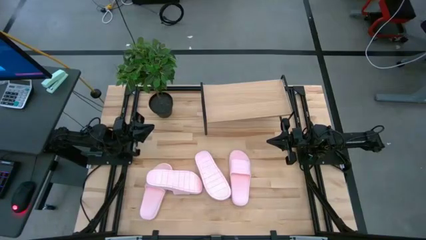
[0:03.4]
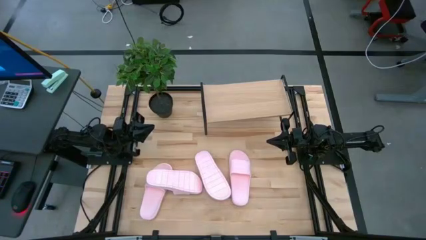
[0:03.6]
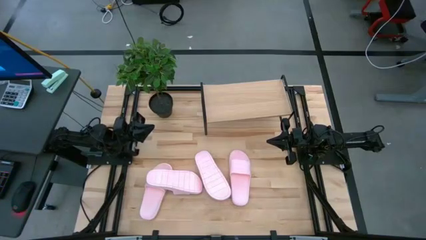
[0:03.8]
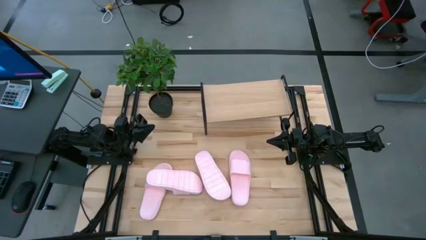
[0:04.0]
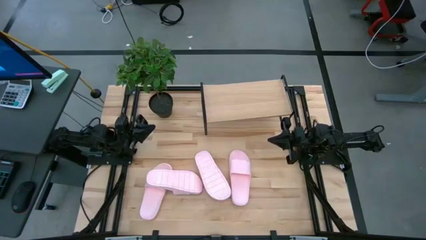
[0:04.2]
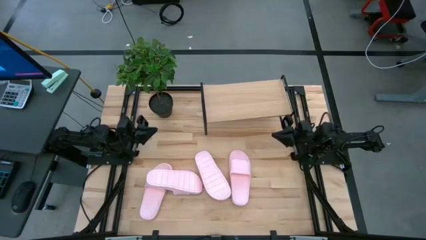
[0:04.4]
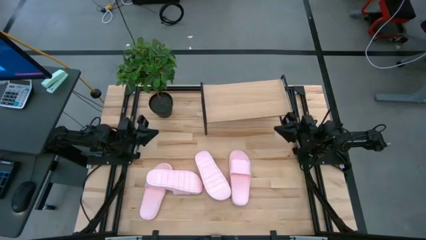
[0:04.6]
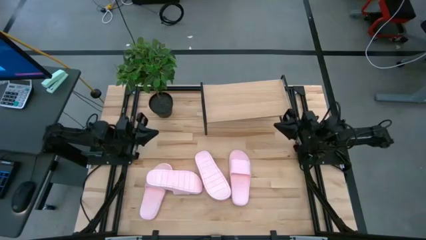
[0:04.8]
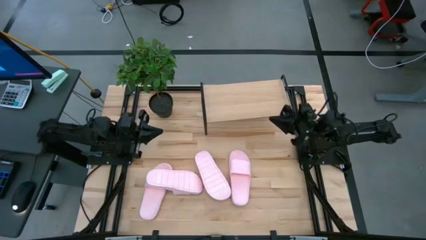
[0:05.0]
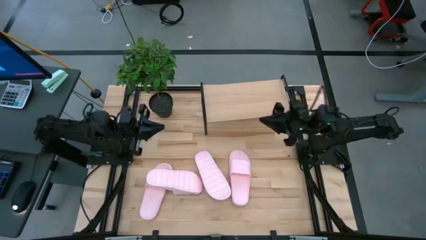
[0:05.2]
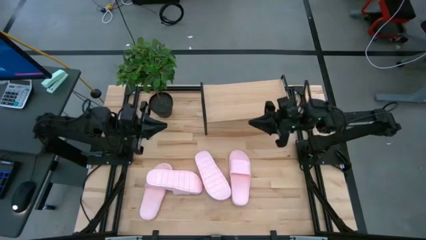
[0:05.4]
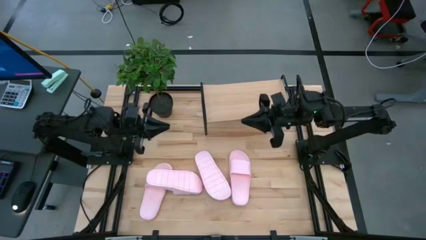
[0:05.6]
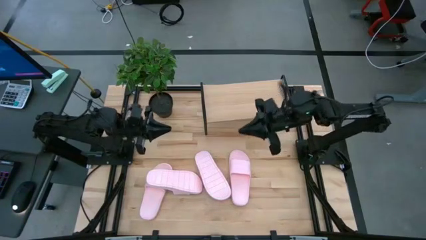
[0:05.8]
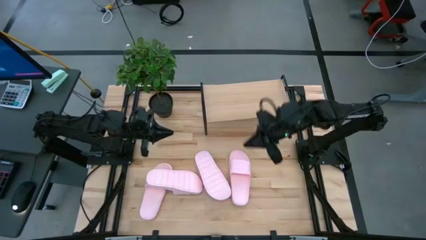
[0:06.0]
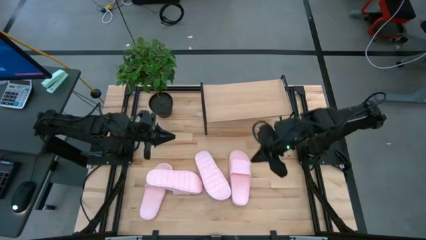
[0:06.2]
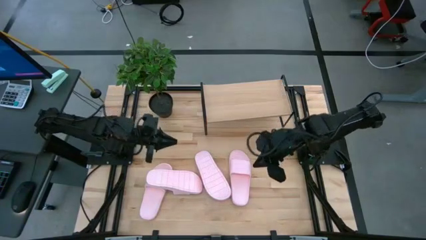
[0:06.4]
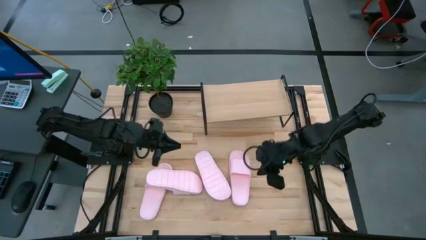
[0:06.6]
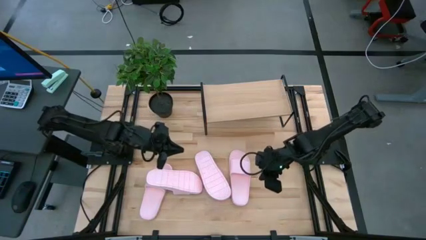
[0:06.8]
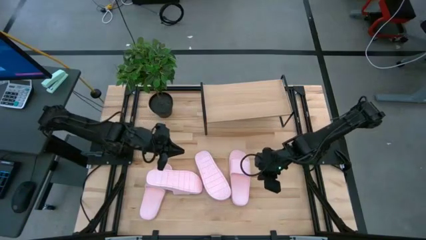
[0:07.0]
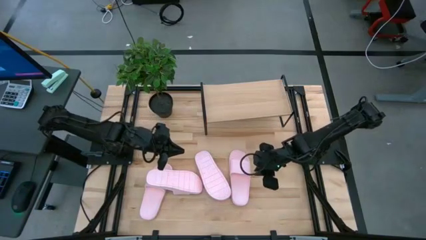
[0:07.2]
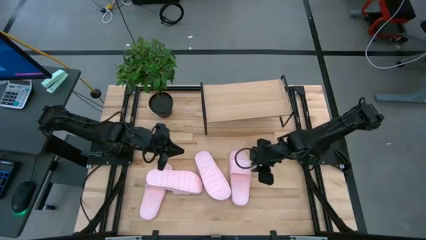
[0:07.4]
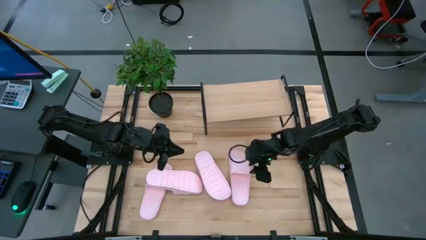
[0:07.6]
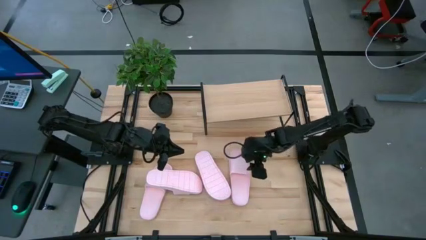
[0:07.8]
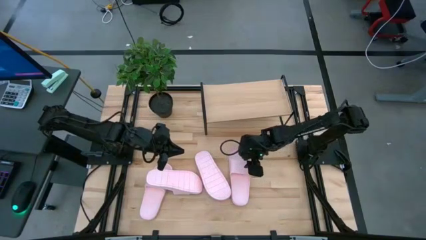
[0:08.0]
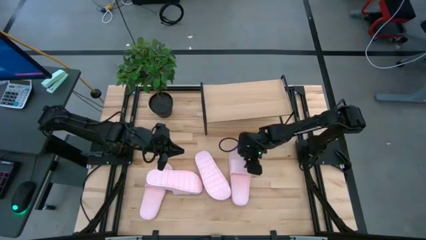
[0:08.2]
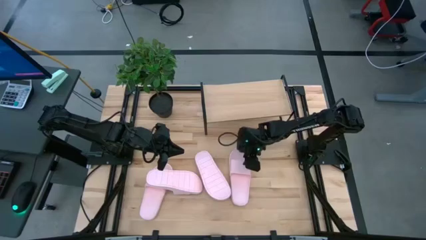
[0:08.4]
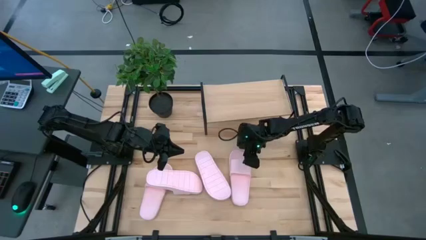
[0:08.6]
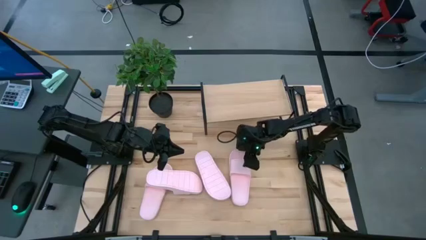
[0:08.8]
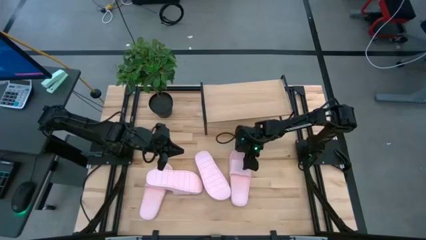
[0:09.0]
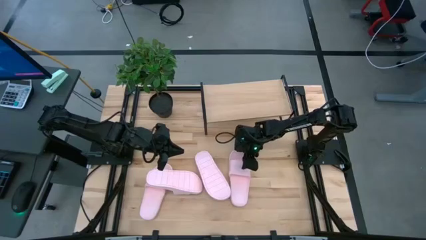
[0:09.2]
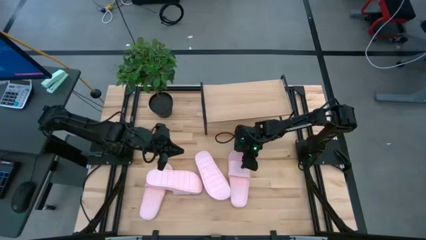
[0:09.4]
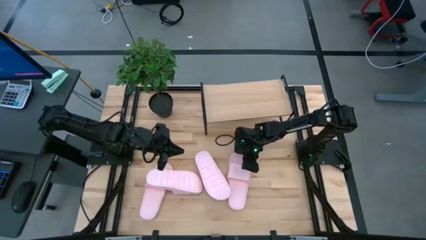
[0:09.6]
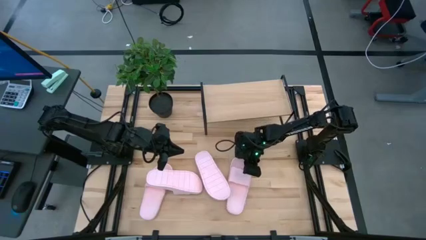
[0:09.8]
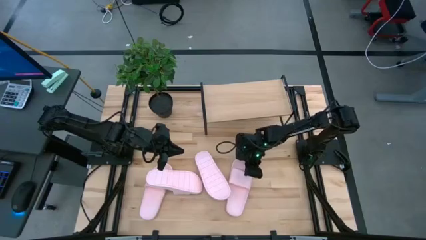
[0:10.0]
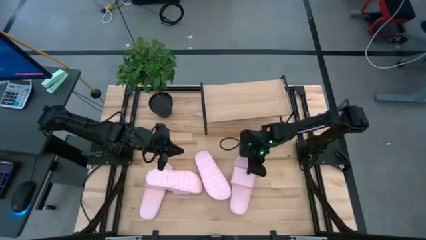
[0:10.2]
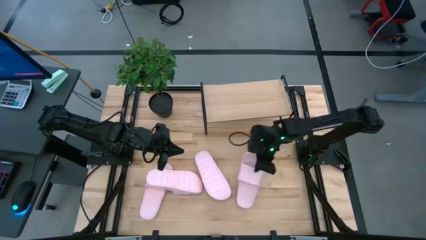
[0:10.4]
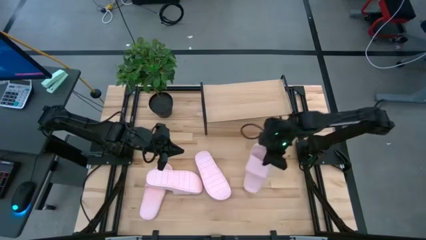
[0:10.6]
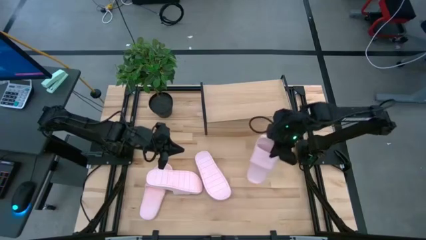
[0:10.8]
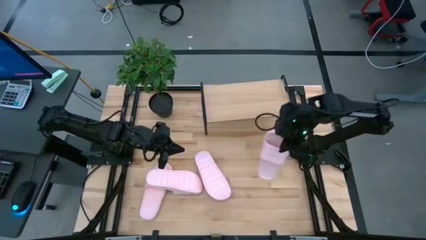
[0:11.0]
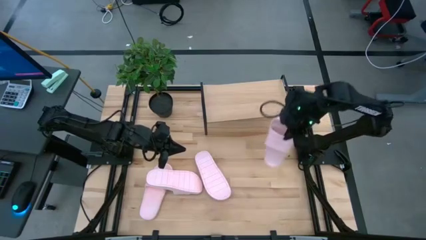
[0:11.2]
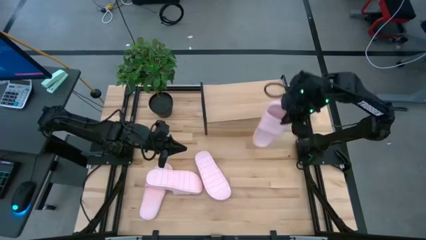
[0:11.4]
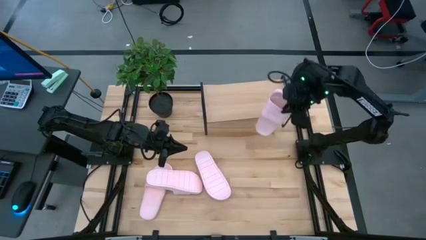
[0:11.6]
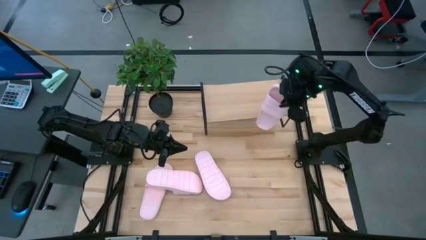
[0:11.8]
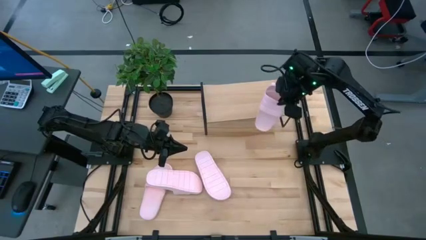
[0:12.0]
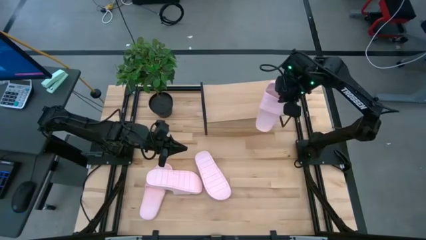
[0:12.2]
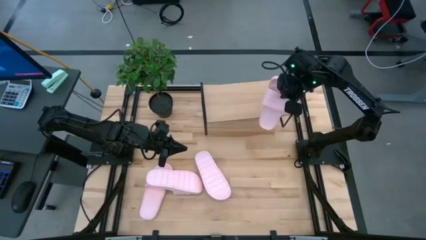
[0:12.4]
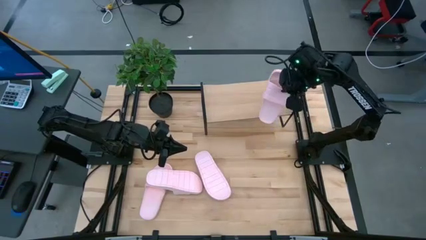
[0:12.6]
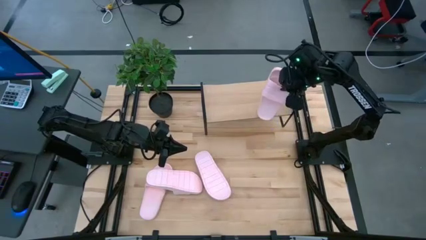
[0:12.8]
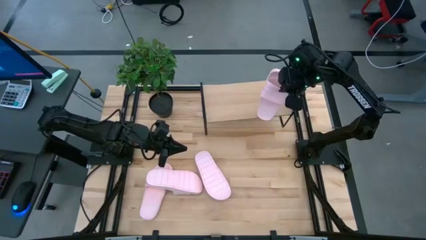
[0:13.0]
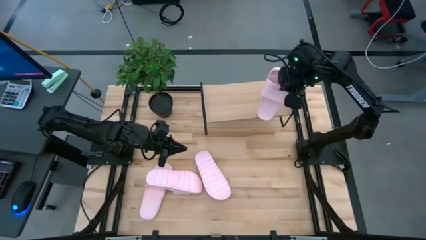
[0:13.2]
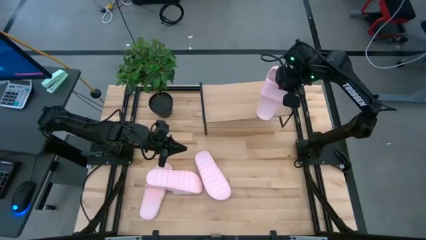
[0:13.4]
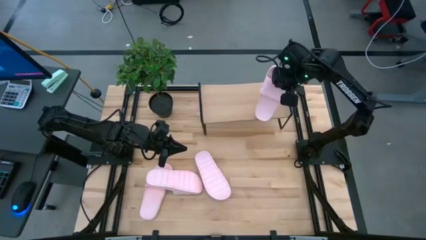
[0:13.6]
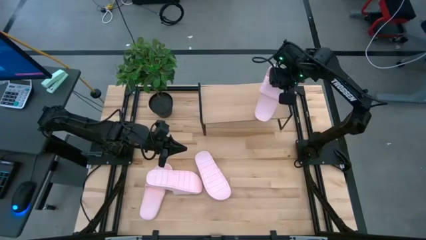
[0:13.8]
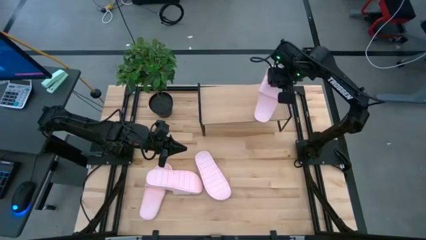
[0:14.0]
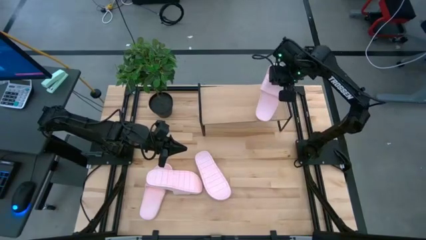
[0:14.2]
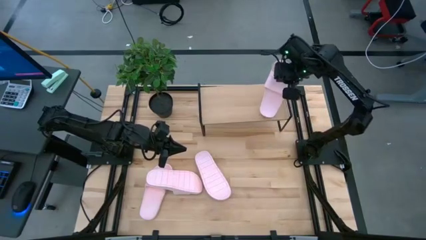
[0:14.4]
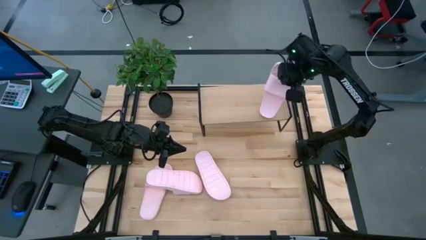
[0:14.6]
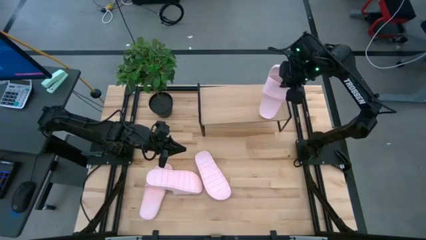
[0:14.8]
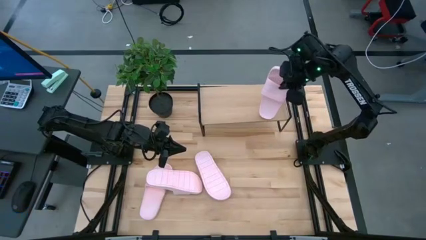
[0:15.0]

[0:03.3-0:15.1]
Task: Pick and place slides into the shelf
Put the right pink slide on the shelf
